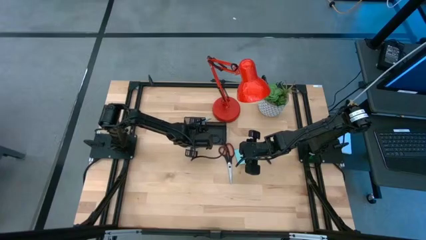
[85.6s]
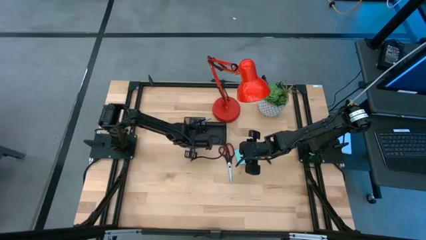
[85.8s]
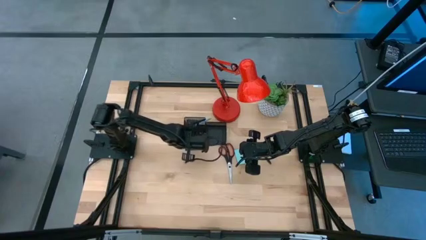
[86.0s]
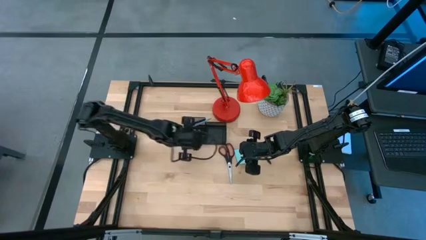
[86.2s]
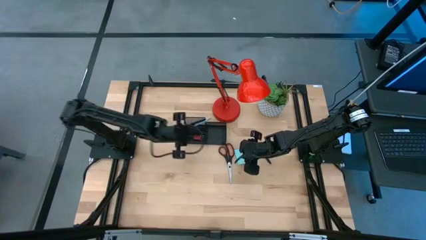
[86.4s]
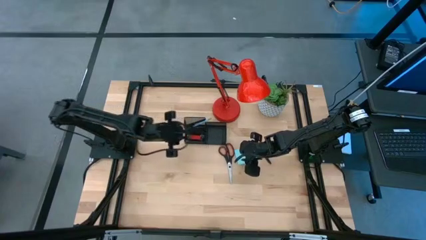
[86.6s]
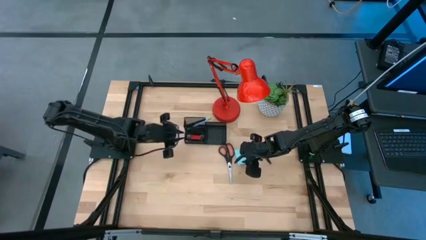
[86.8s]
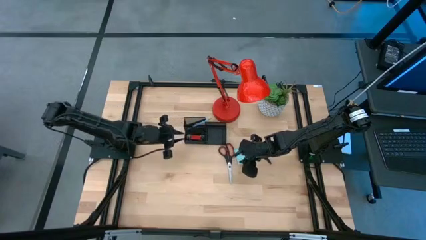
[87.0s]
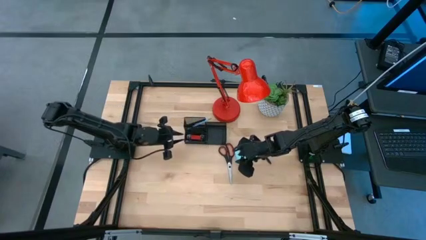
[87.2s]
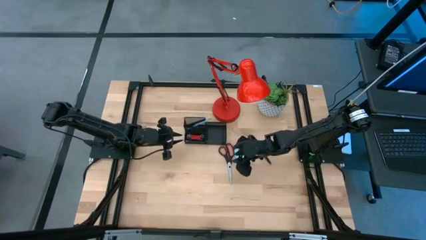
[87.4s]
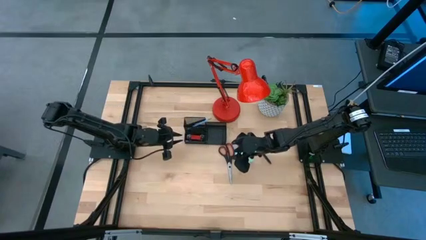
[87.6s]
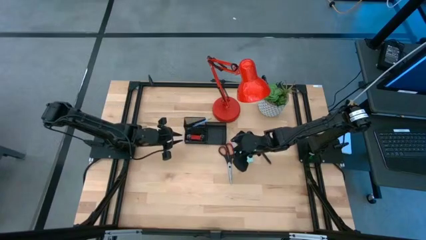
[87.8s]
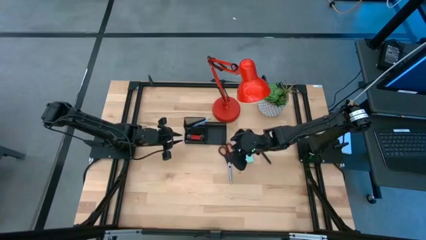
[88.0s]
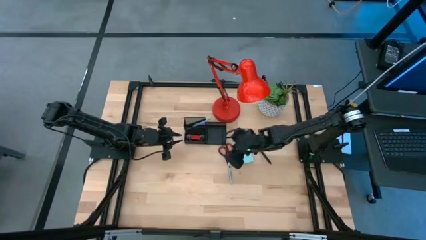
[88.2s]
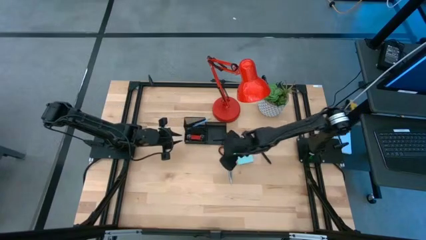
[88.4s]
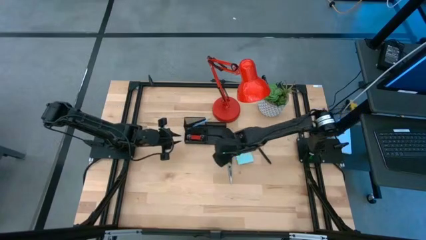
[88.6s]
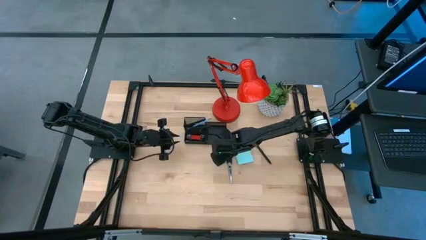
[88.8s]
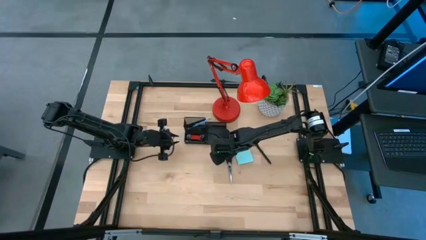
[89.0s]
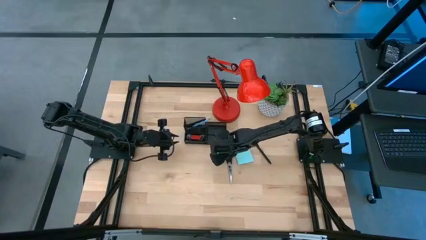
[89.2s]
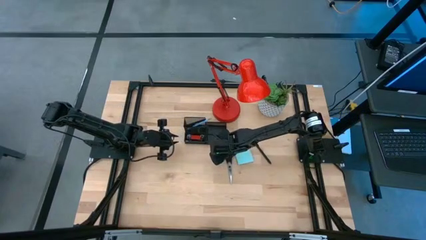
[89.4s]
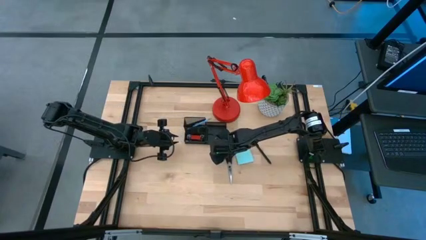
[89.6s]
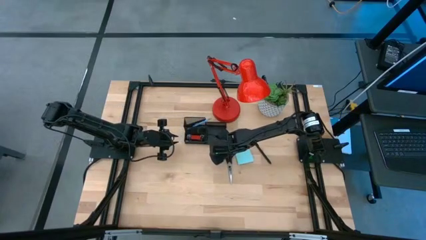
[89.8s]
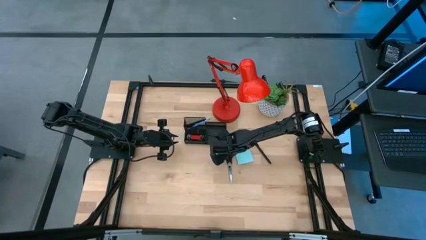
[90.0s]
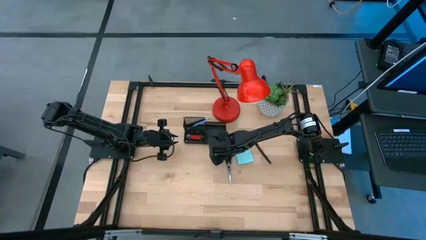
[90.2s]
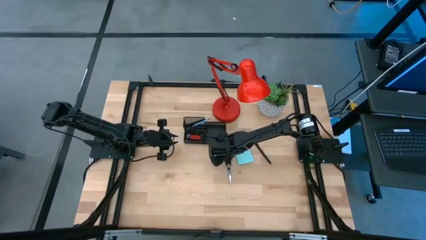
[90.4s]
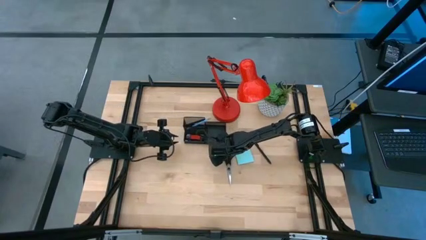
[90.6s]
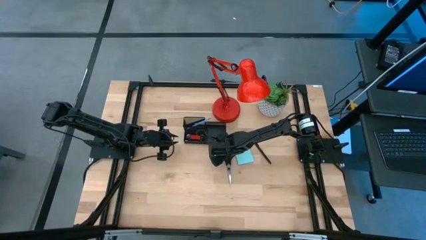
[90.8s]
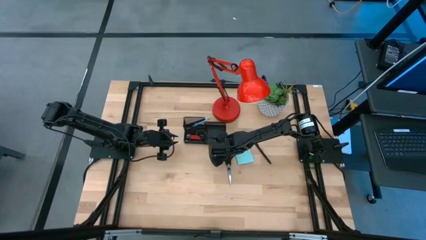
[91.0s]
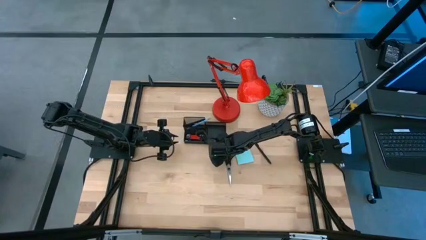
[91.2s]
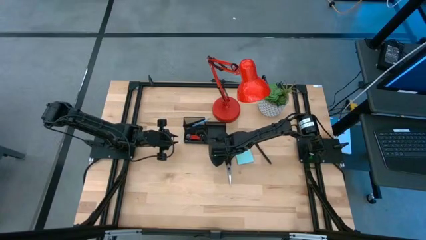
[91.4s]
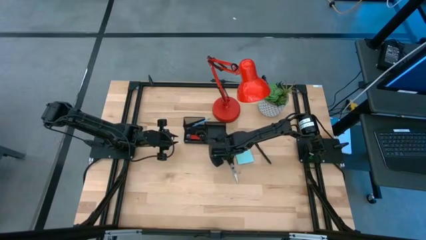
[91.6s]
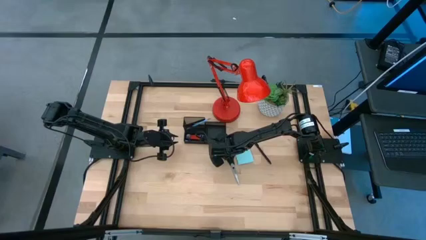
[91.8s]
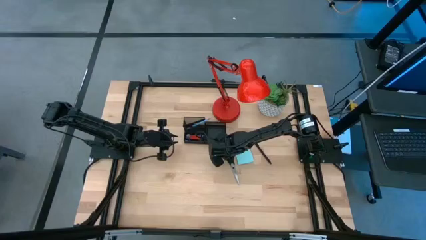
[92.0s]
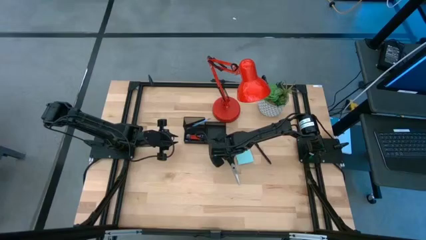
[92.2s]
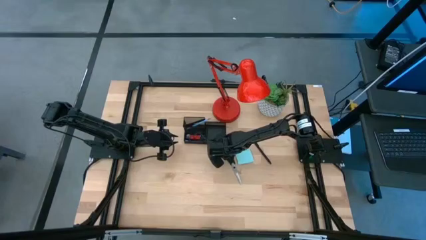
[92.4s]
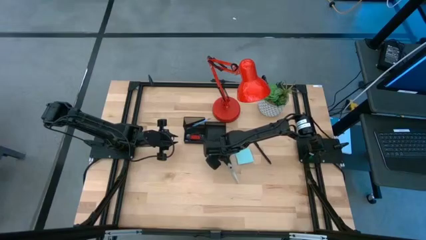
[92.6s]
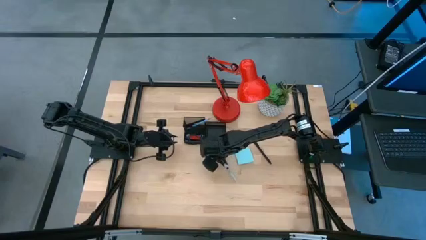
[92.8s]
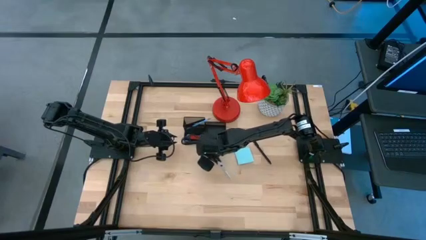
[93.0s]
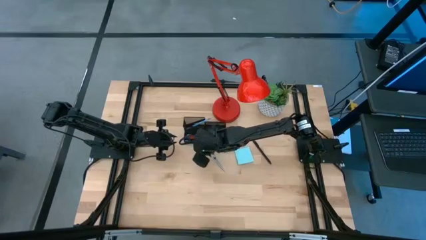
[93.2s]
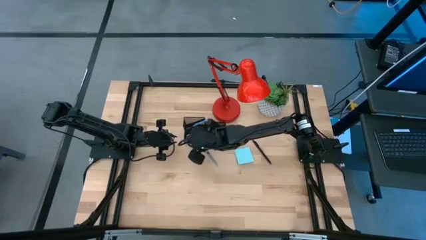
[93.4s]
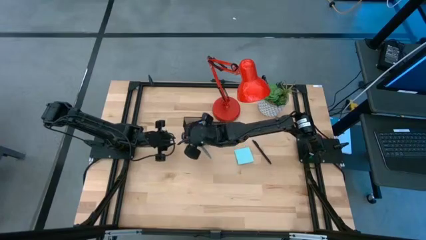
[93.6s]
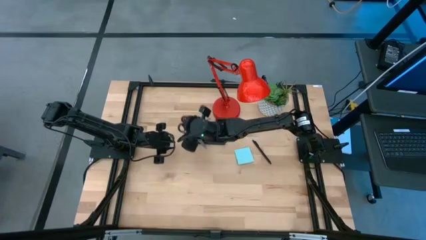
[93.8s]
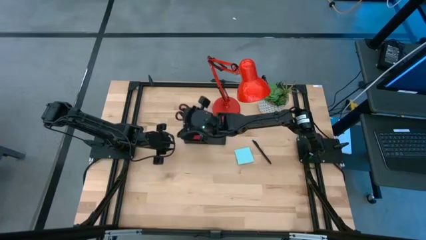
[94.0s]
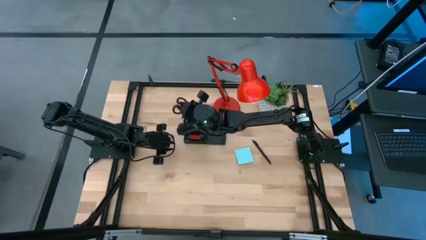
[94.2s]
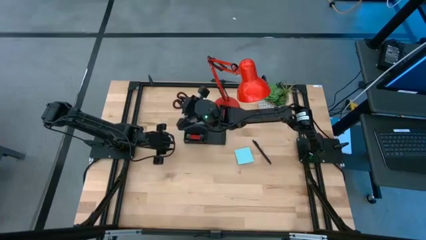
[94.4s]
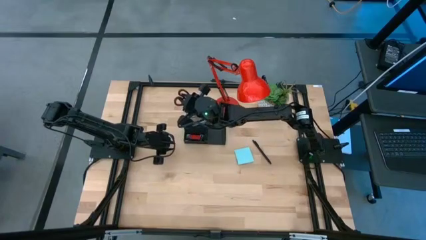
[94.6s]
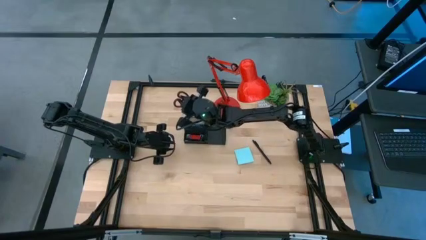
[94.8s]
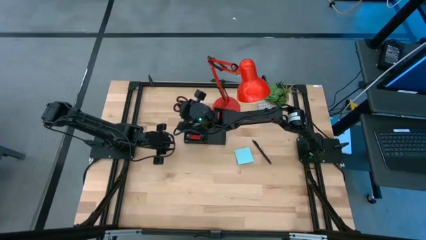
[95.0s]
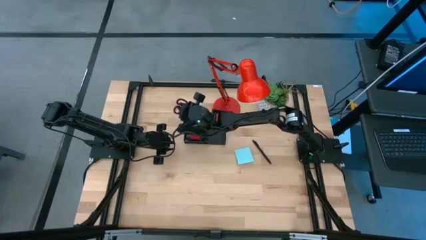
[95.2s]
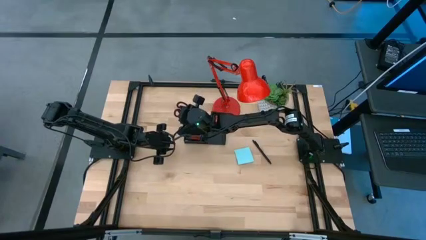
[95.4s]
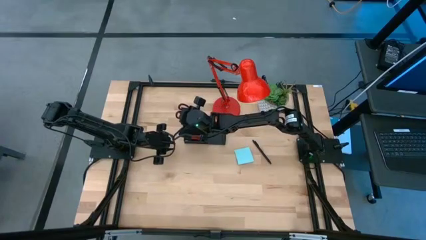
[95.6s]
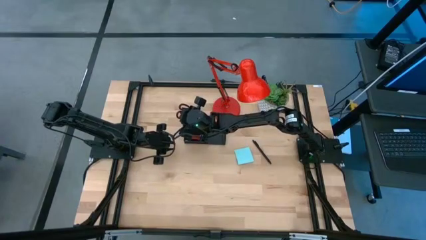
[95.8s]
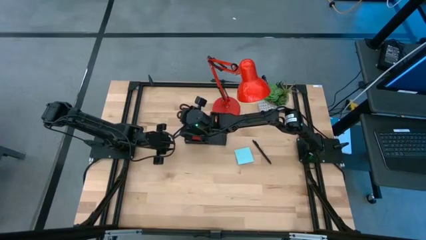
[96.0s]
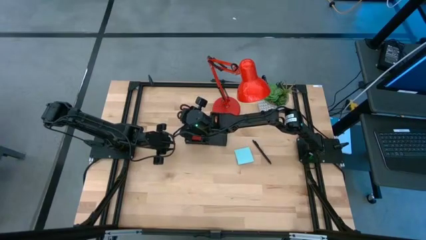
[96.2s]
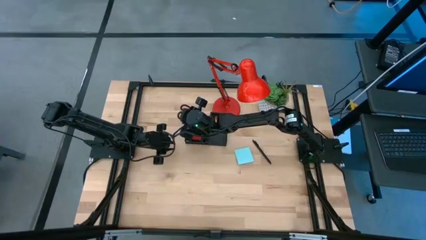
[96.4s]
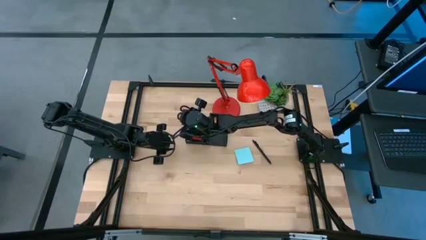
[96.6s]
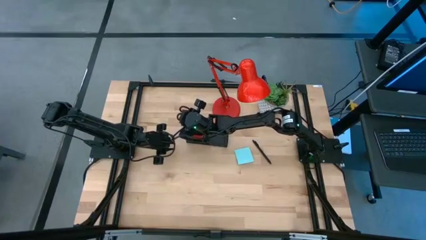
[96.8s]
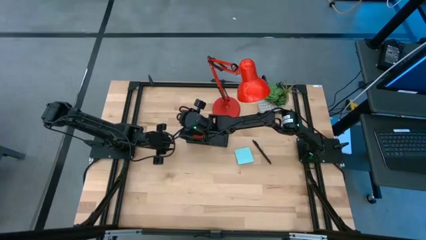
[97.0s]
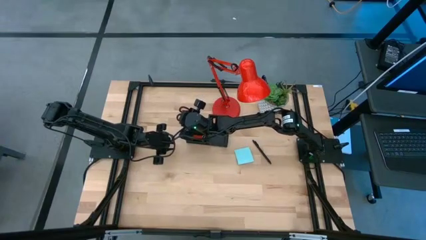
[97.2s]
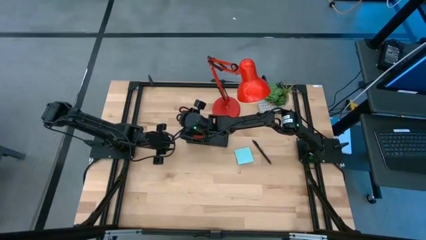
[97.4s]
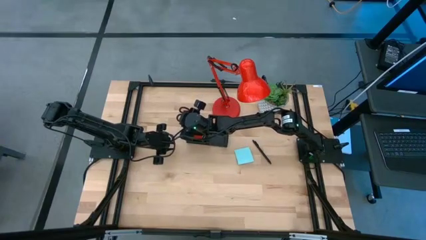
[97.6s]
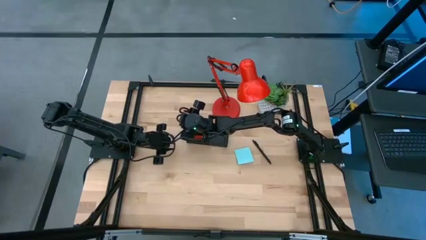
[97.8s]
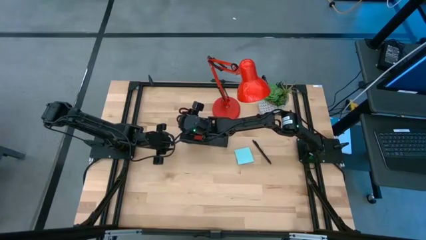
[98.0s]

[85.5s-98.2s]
Task: Pick and place office supplies into organizer
Put the black scissors into the black desk organizer

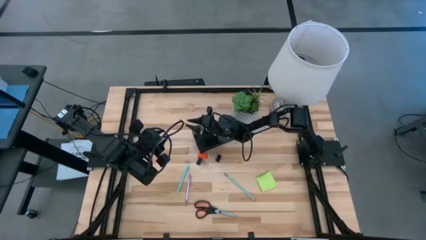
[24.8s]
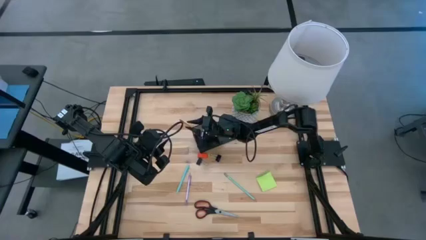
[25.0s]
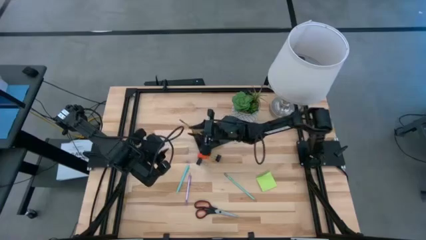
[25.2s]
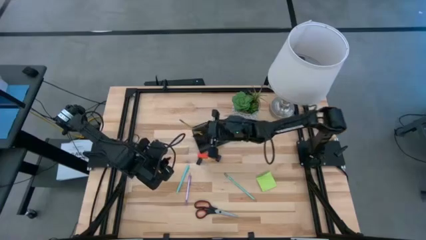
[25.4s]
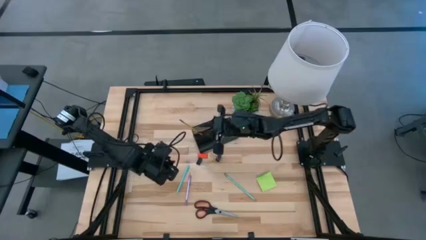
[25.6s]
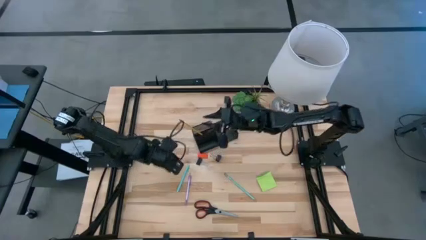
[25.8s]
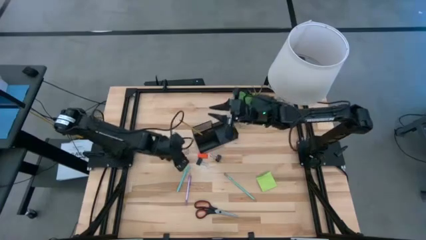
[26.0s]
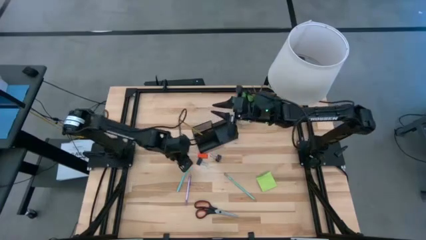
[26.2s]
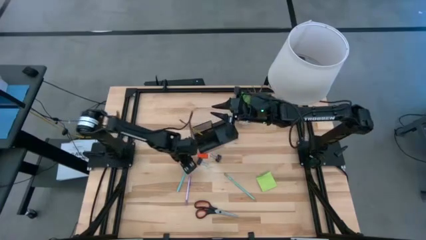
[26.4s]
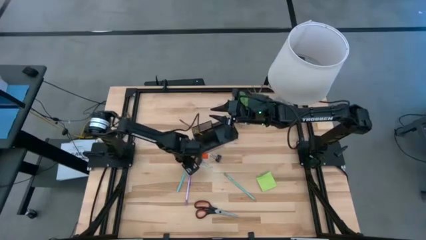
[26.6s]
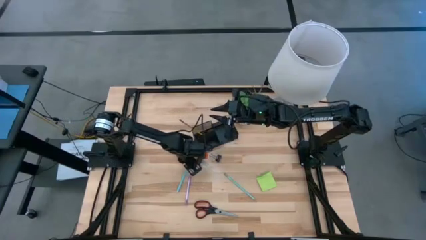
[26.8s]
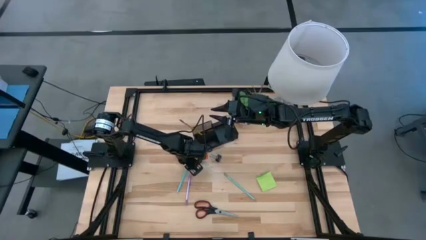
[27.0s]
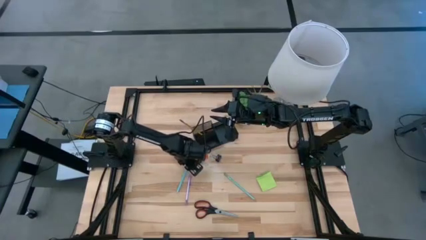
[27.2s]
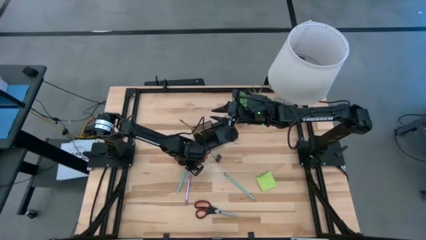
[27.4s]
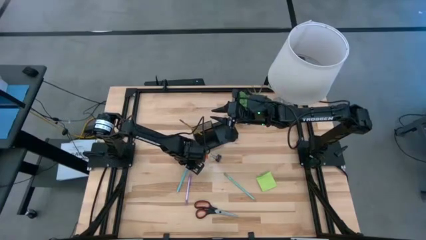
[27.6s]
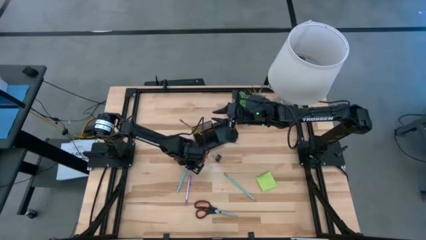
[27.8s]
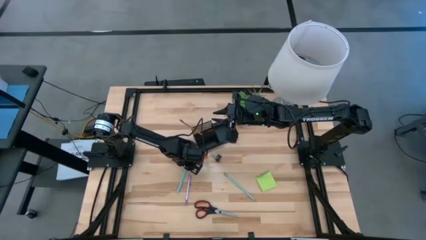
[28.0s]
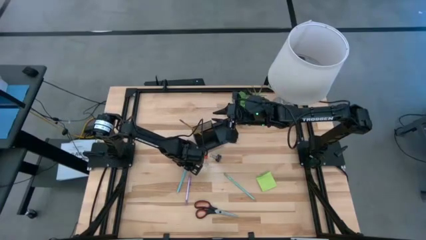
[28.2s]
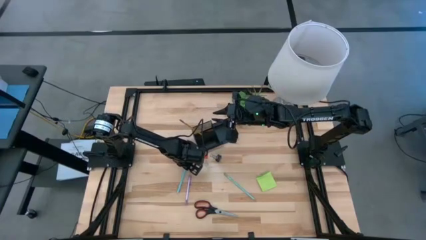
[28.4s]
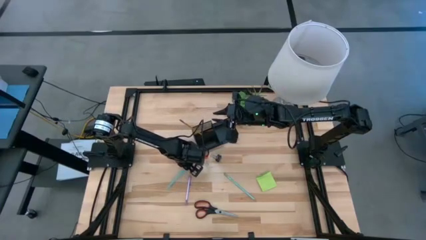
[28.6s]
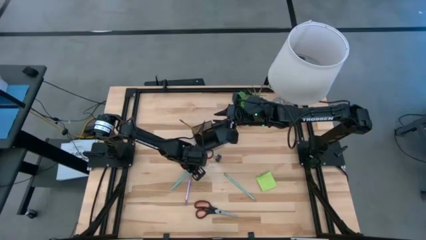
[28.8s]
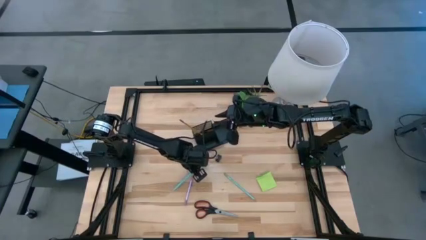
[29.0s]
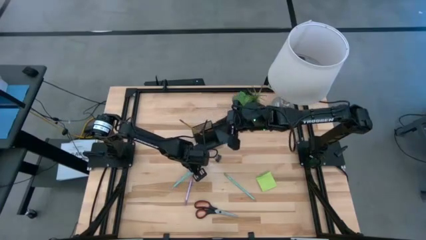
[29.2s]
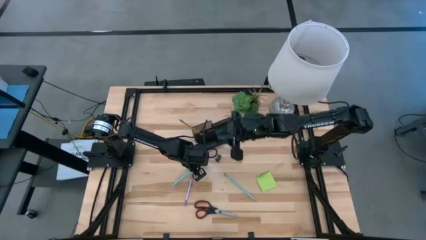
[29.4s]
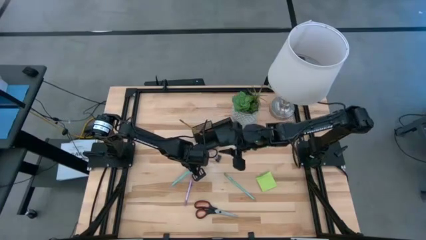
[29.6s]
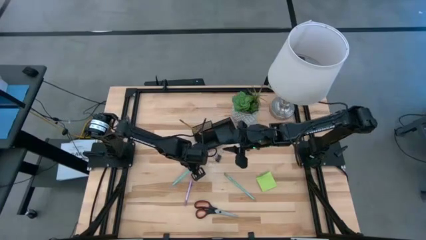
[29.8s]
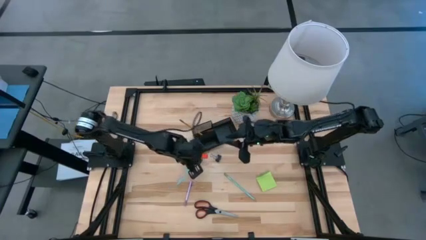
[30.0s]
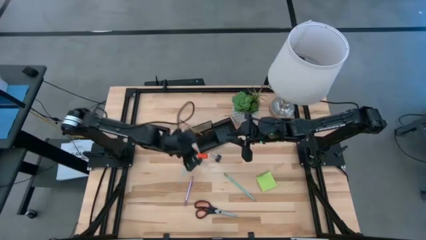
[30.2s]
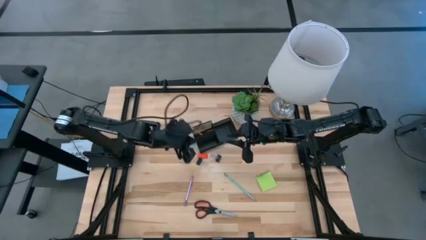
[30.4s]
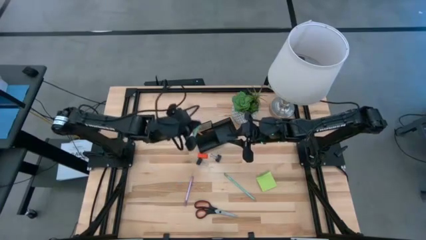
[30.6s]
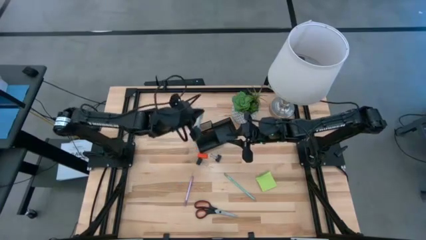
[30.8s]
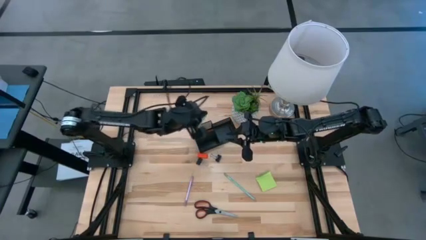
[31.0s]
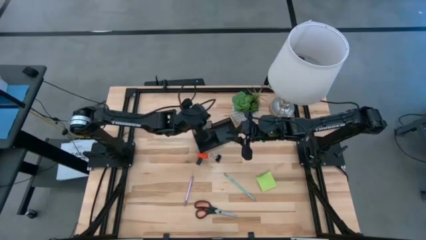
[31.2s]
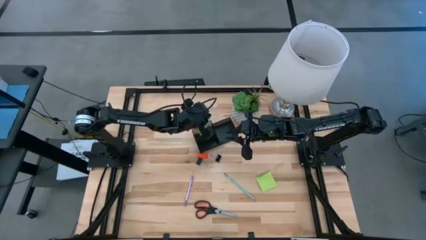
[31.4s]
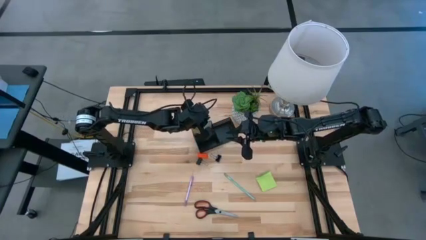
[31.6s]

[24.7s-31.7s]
Task: Pick and place office supplies into organizer
Put the blue pen into the black desk organizer
